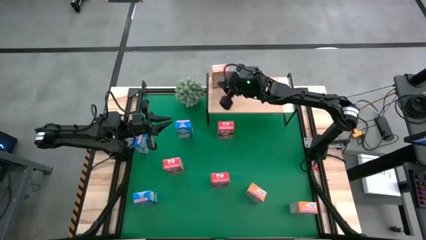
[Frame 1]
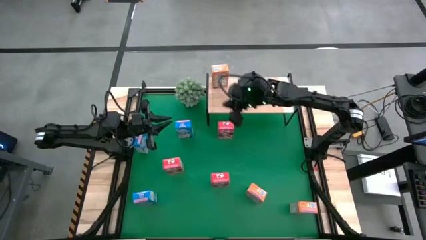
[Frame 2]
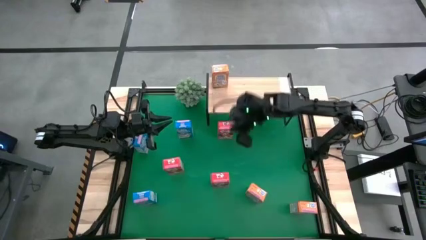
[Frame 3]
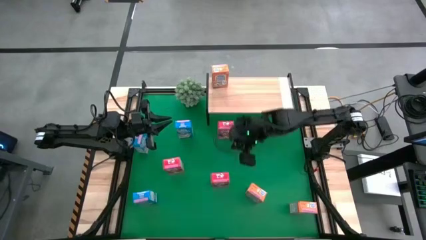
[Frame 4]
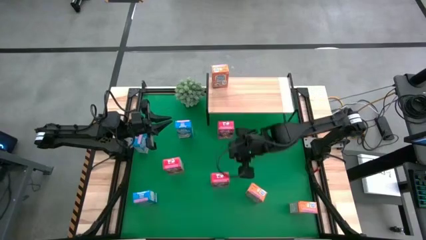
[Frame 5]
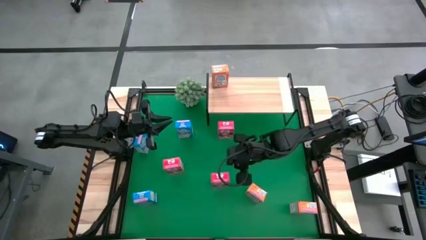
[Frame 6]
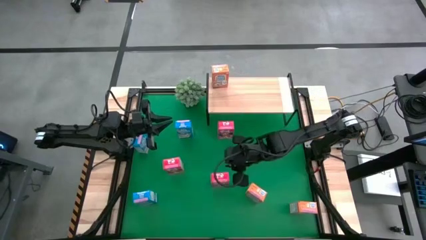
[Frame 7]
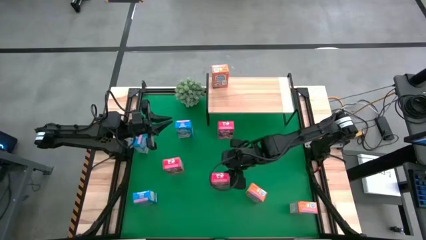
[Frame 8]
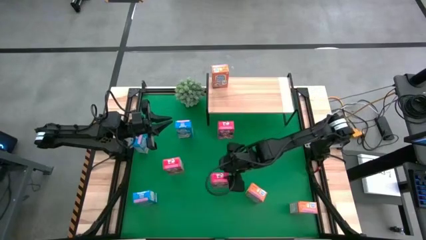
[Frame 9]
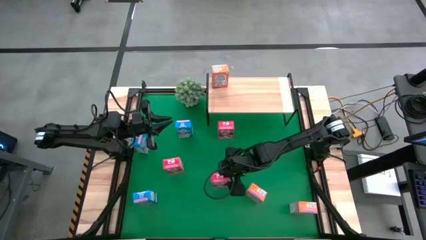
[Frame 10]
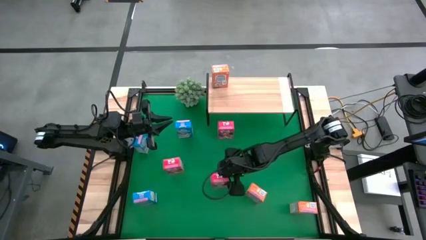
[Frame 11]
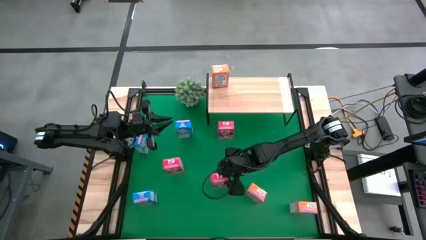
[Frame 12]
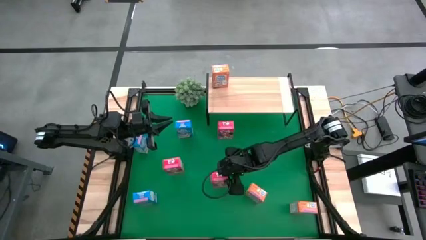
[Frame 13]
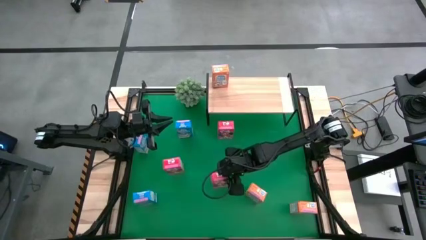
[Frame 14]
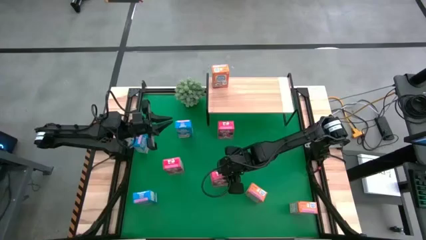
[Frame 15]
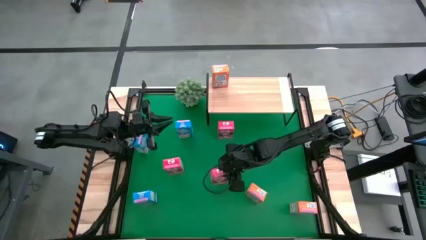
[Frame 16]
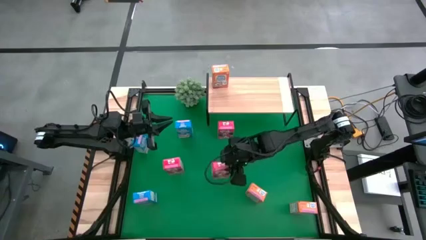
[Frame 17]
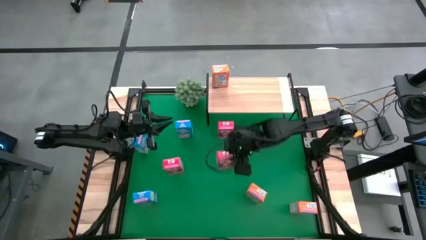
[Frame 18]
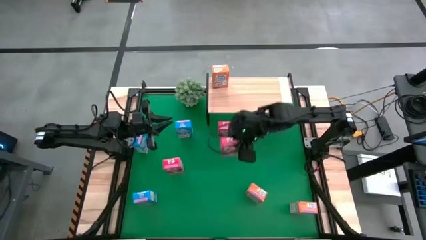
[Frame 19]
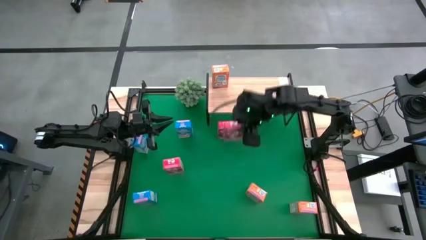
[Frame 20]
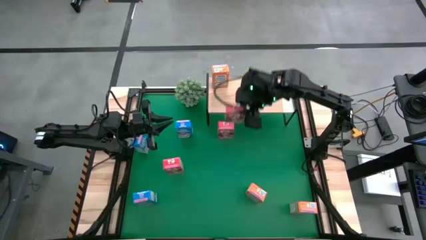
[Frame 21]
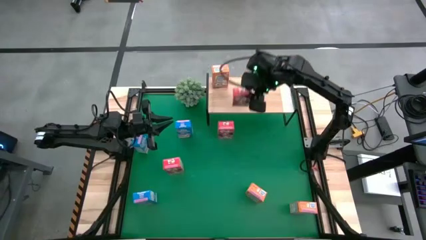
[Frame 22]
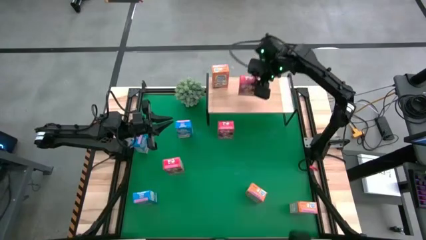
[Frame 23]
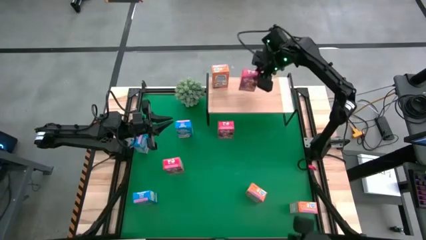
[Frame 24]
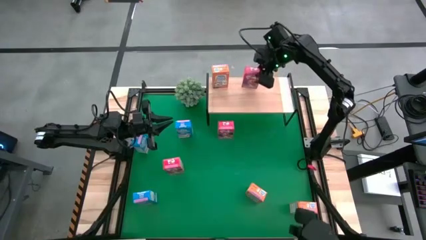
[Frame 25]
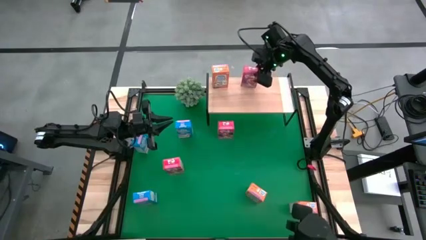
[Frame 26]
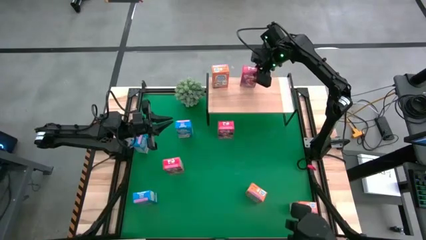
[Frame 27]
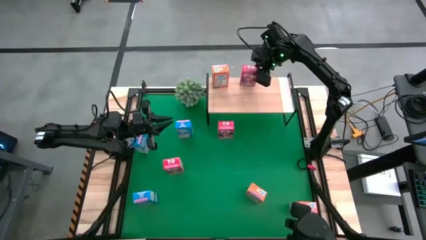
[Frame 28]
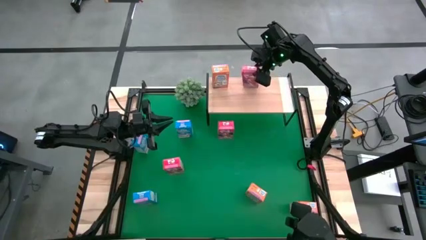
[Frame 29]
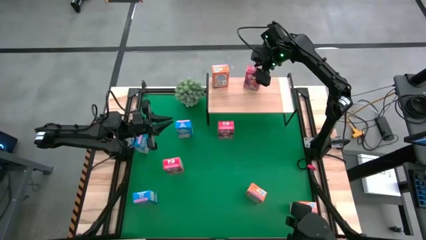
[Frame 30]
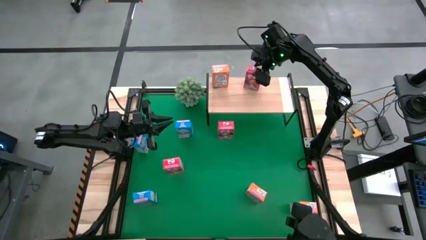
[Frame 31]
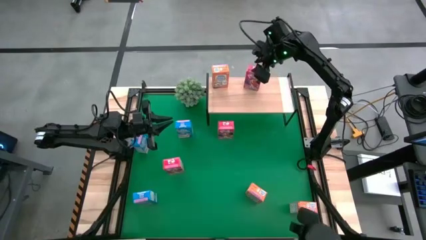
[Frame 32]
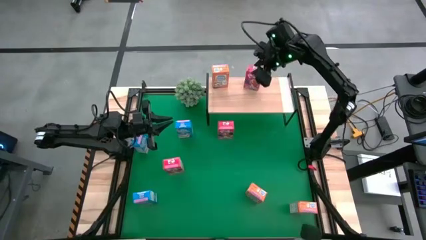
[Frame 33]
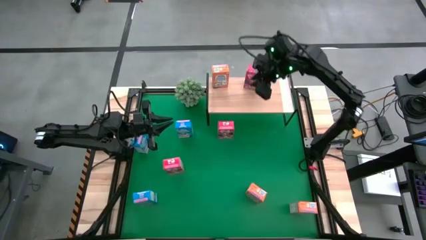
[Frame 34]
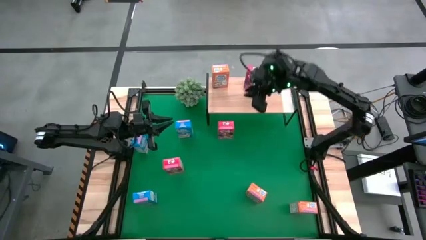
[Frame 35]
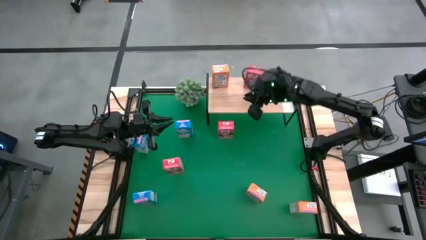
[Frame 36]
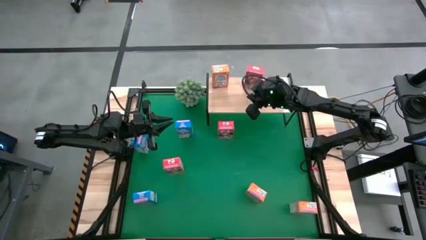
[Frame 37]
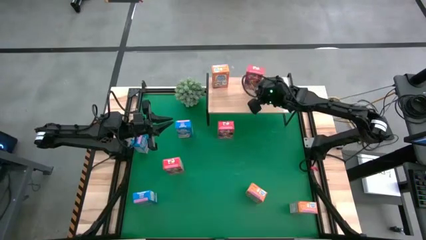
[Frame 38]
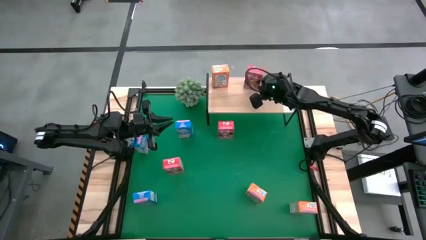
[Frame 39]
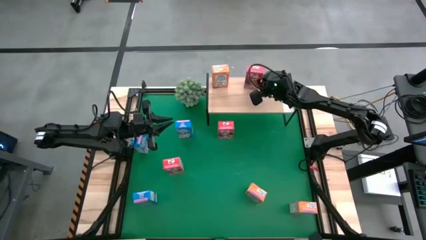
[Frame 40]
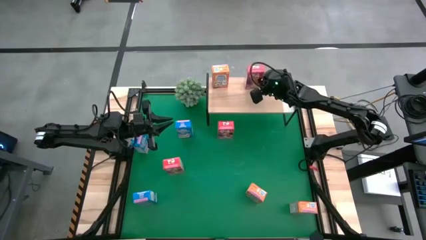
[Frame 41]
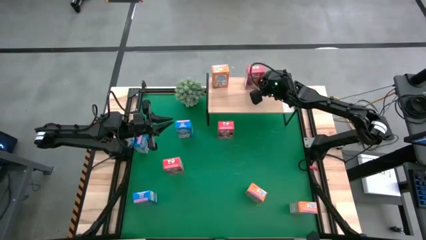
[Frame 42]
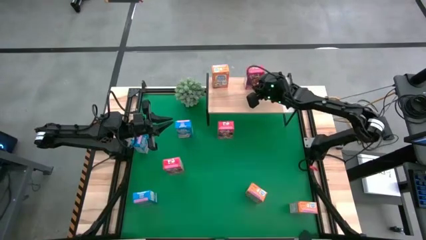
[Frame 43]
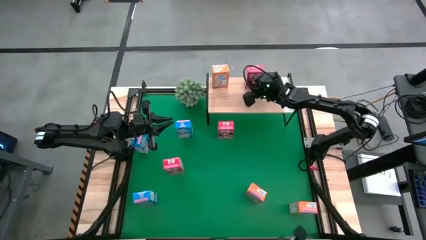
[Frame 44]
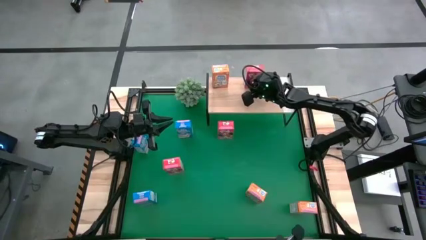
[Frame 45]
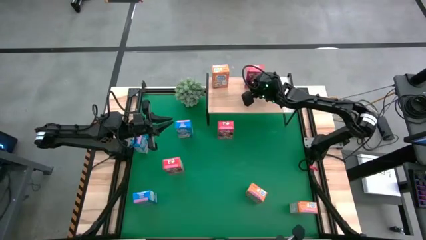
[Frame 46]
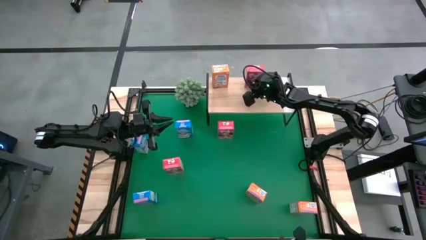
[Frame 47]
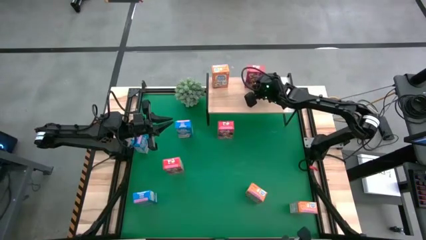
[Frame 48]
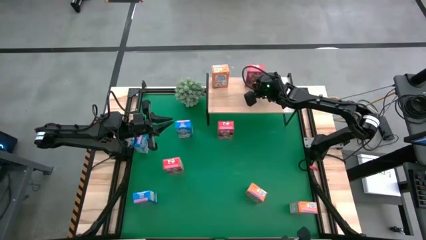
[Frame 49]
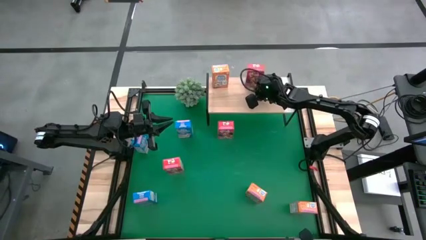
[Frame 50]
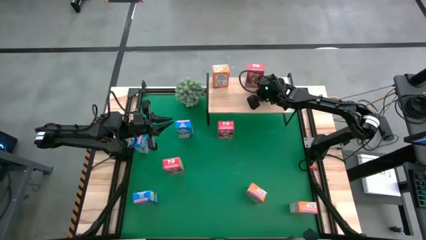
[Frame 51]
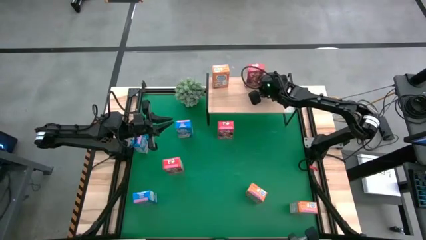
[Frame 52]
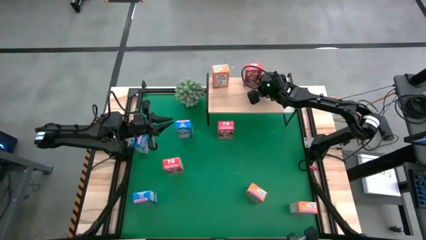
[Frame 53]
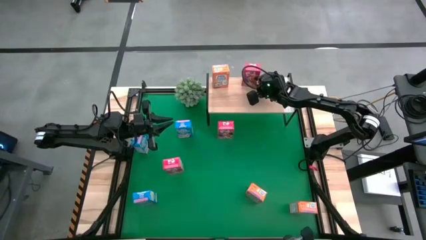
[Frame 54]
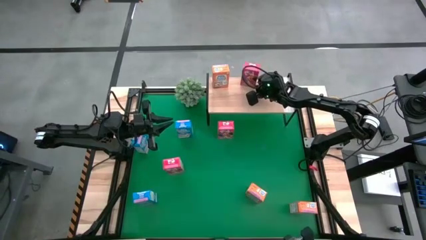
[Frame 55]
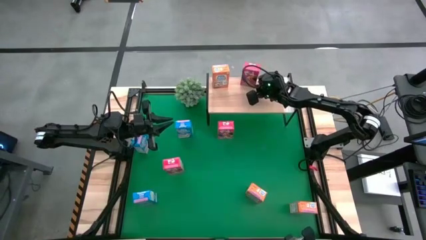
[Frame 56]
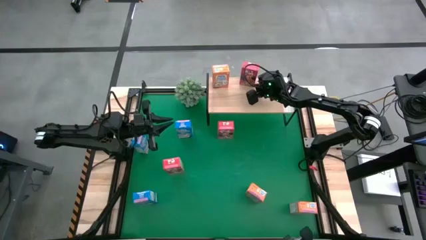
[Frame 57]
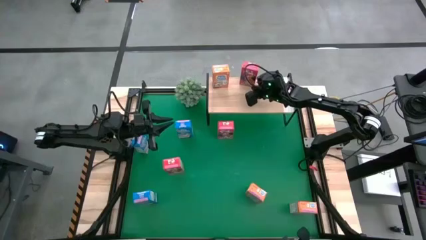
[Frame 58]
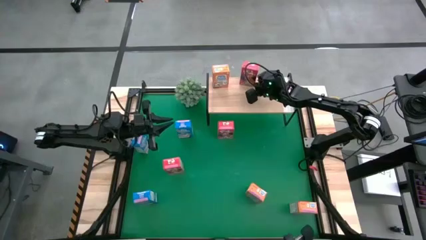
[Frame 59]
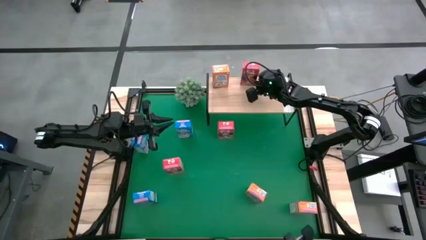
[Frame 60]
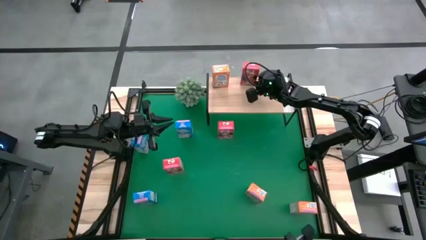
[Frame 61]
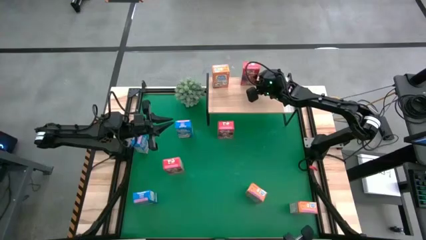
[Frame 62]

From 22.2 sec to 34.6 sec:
Task: Stack cereal on shelf
Put the bottom right red cereal box on the shelf
